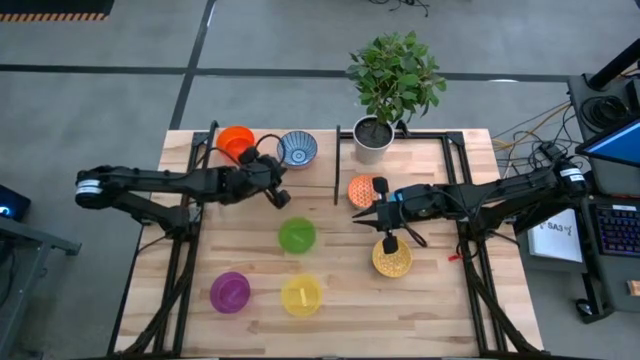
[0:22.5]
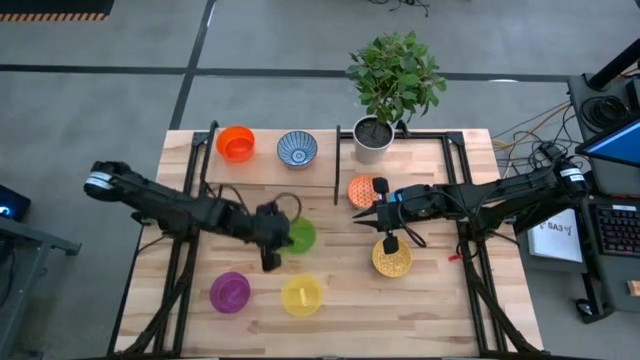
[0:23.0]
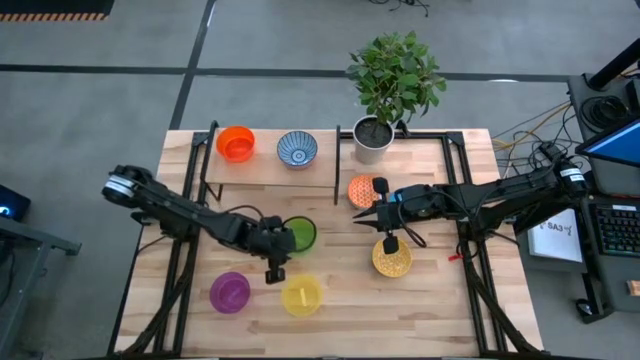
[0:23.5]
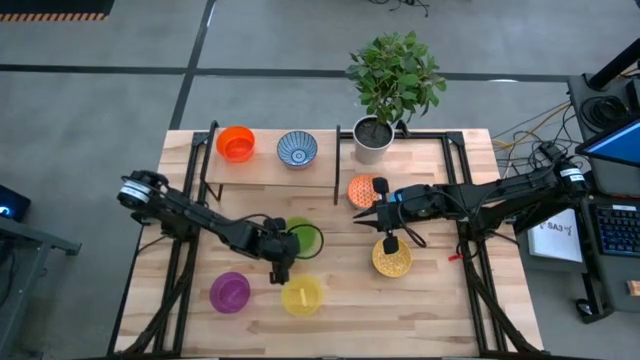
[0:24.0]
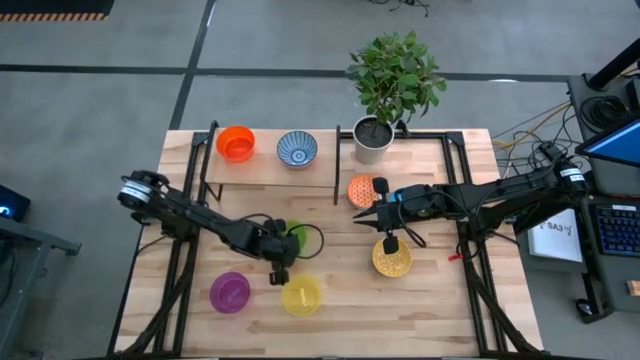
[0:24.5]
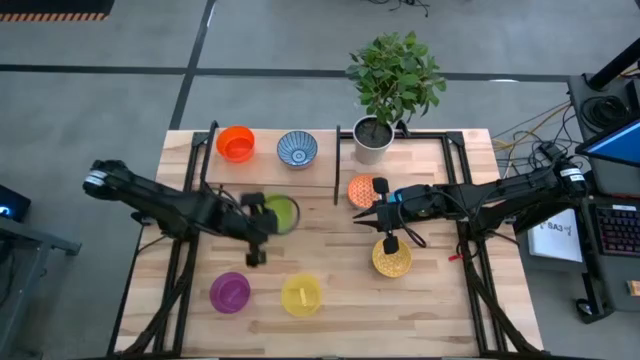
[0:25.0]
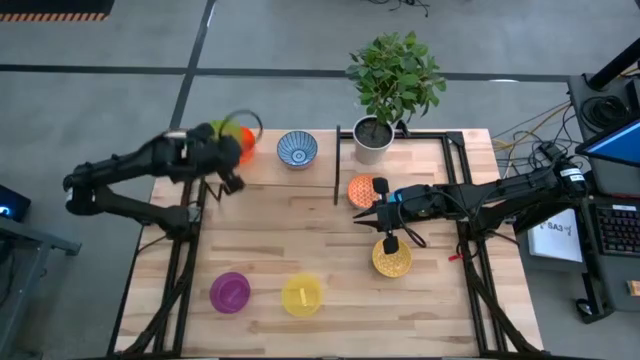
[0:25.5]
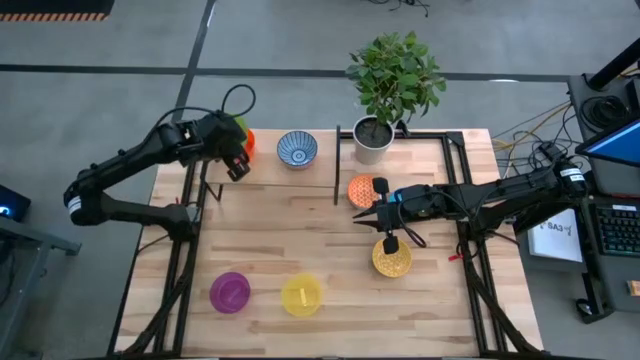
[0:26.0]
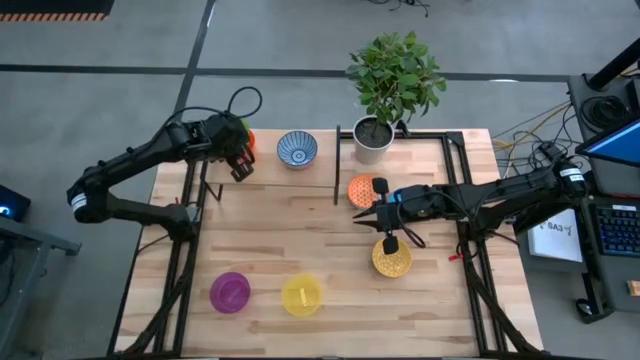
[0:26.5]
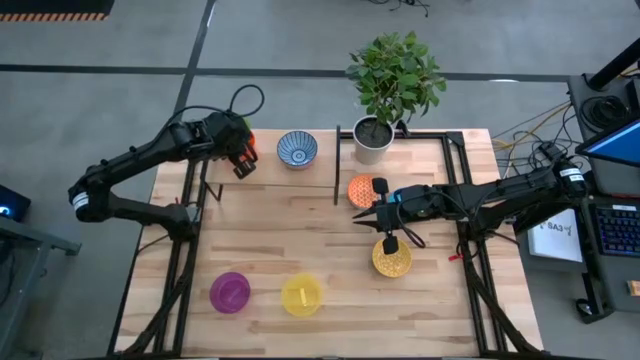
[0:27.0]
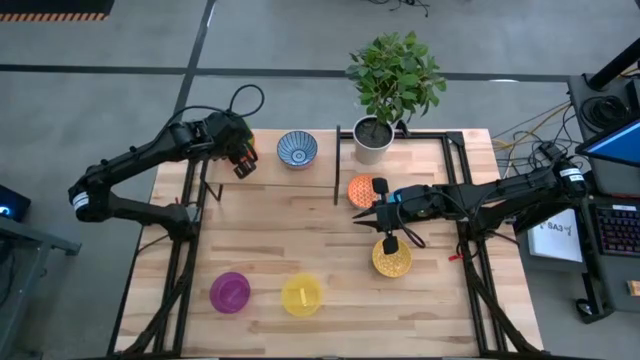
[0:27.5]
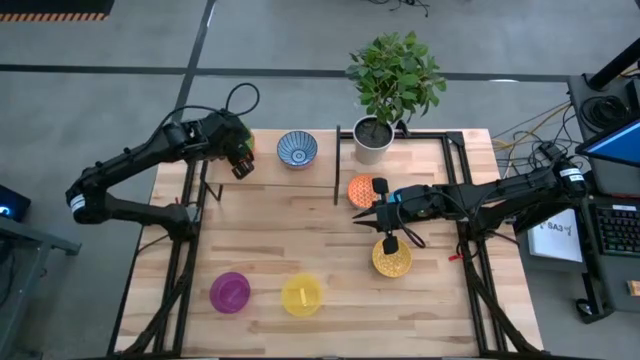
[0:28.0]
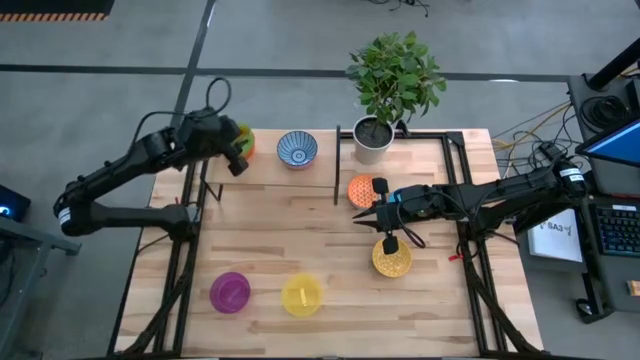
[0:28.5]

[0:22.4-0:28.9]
Task: Place and stack bowls onto a shelf
Stack the green bowl on the orange bowl on the shelf

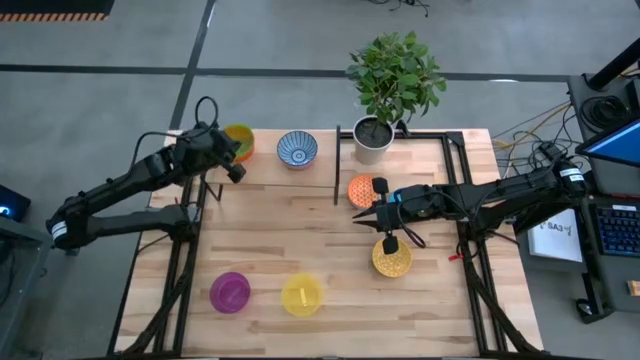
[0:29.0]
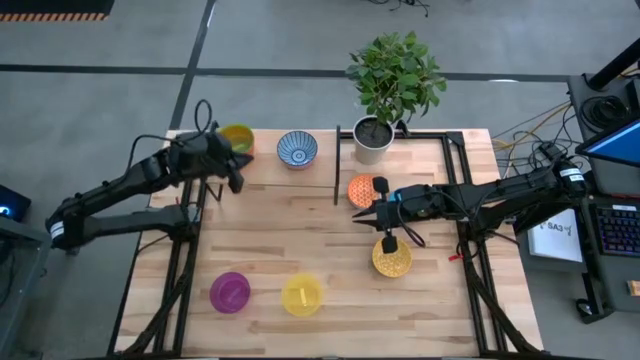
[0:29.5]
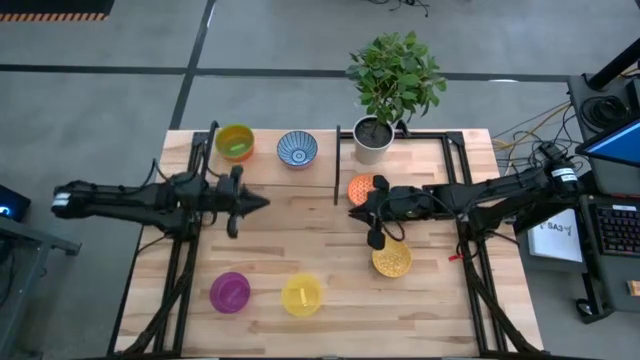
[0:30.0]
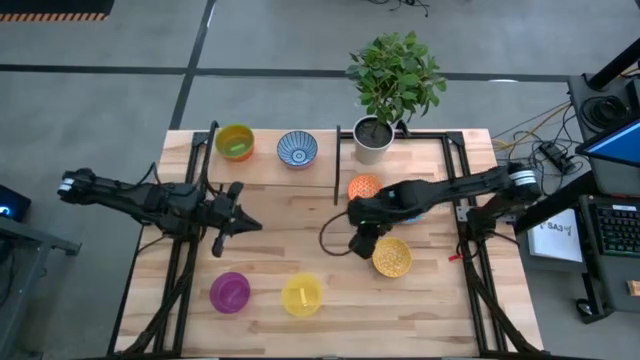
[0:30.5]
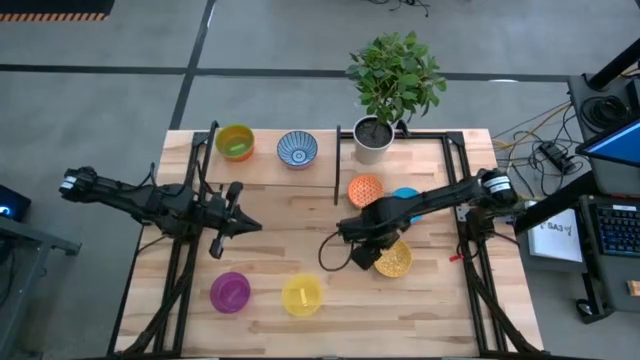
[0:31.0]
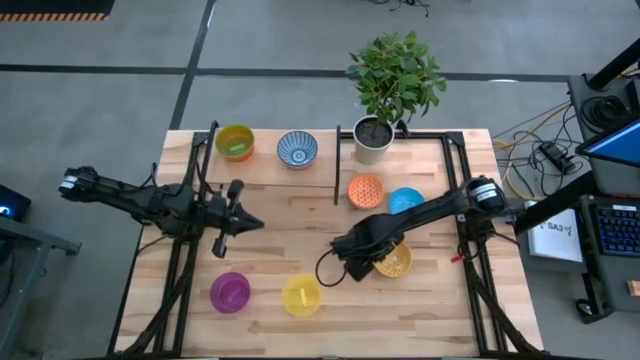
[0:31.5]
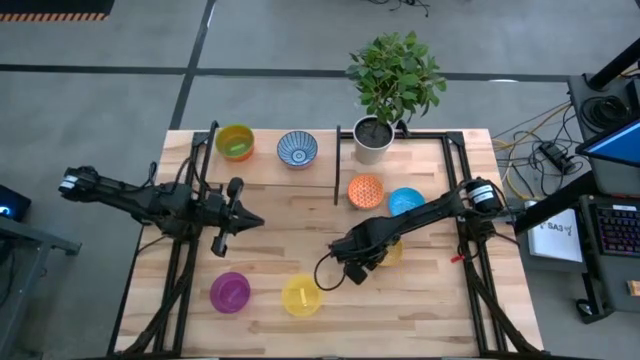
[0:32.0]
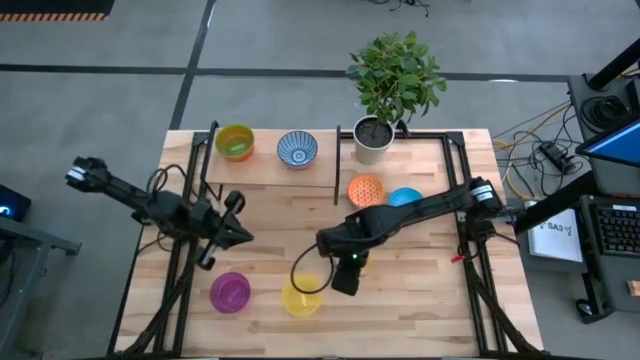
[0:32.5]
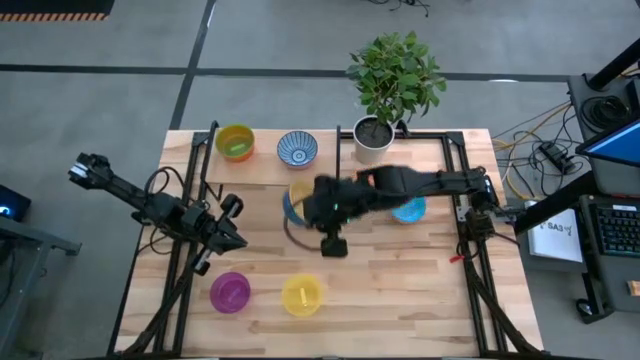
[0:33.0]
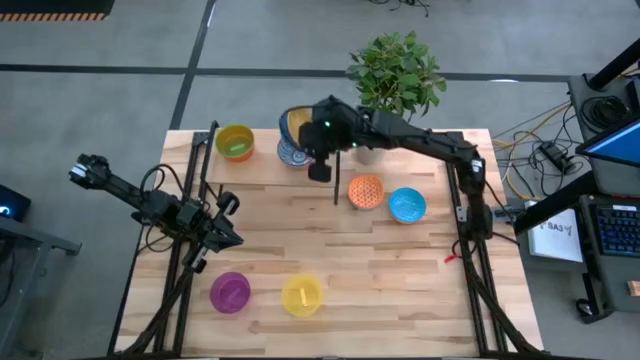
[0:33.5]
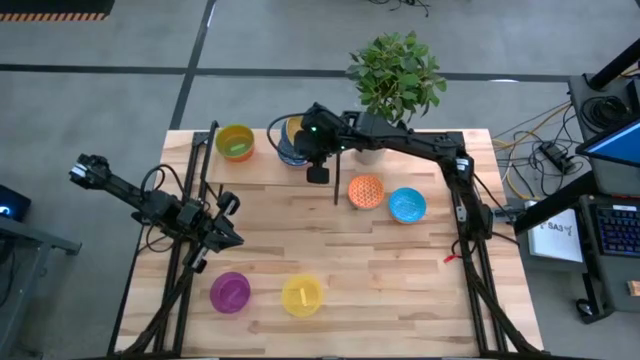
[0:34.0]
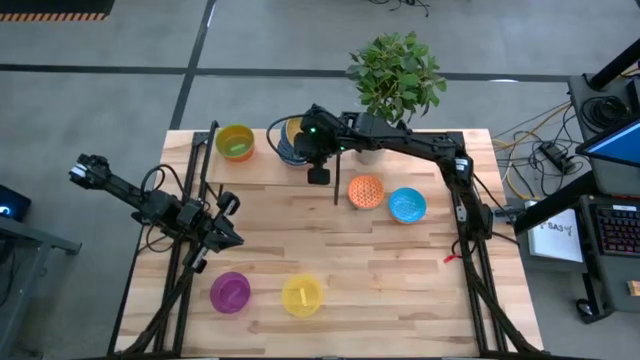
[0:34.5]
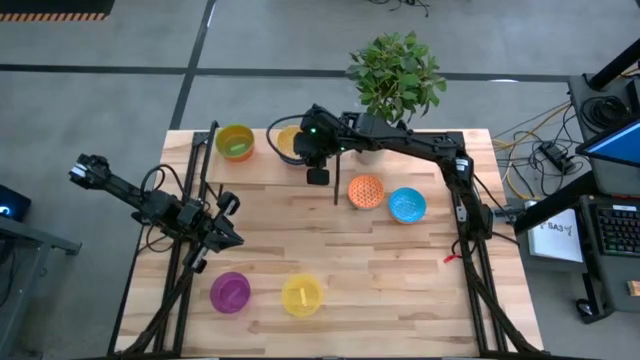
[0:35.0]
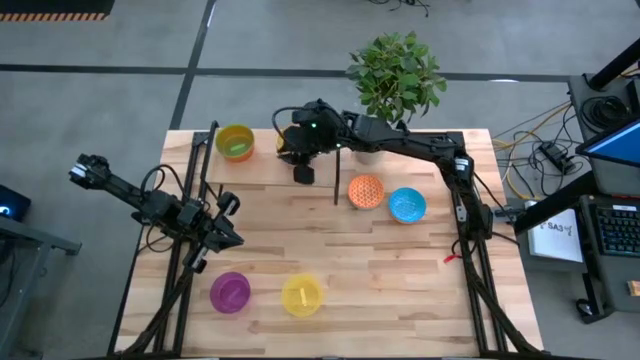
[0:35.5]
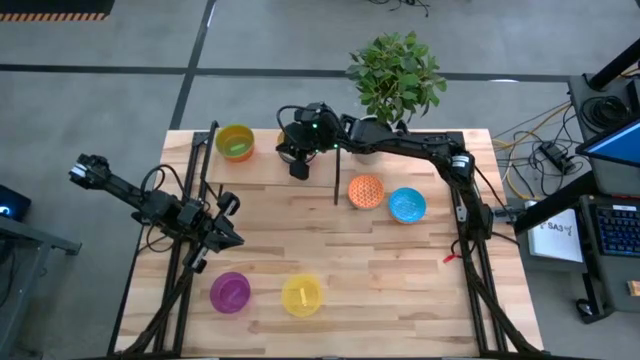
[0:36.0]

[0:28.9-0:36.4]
Stack the yellow bowl on the red bowl on the shelf

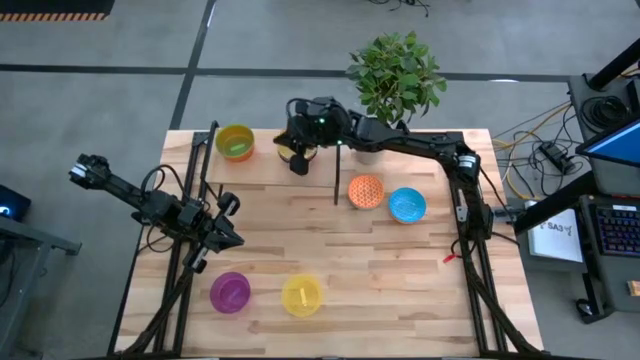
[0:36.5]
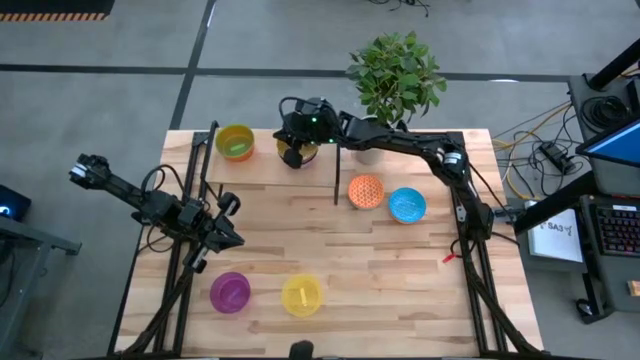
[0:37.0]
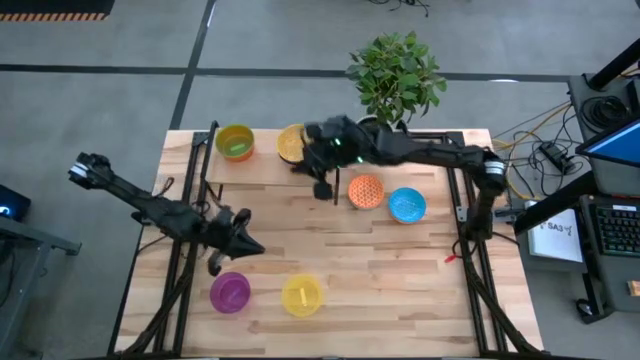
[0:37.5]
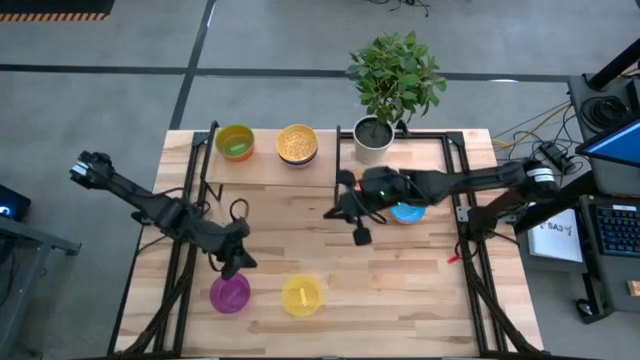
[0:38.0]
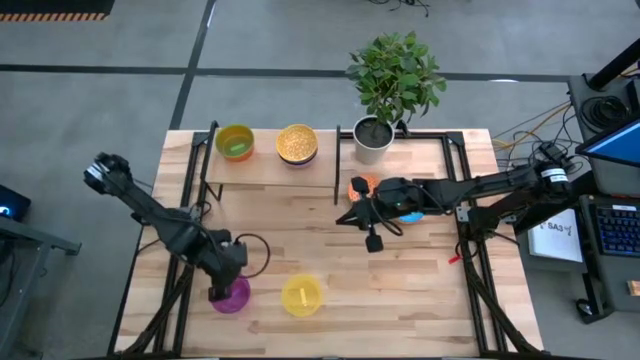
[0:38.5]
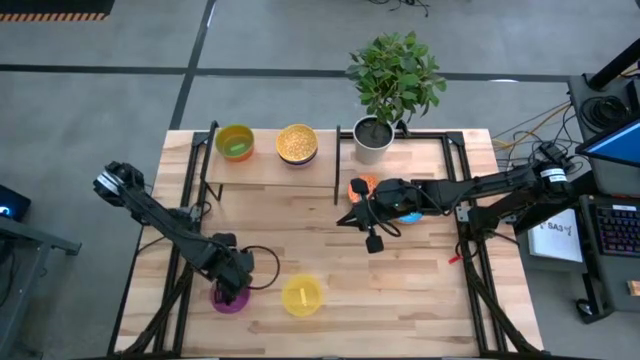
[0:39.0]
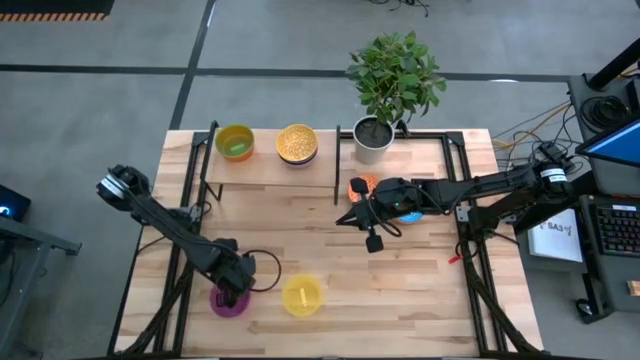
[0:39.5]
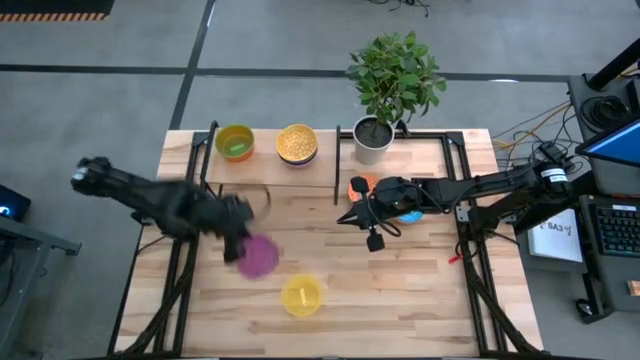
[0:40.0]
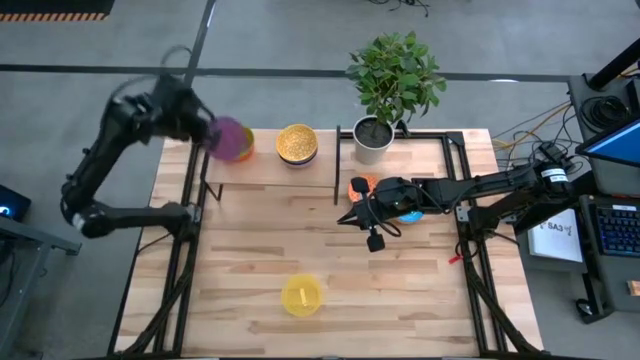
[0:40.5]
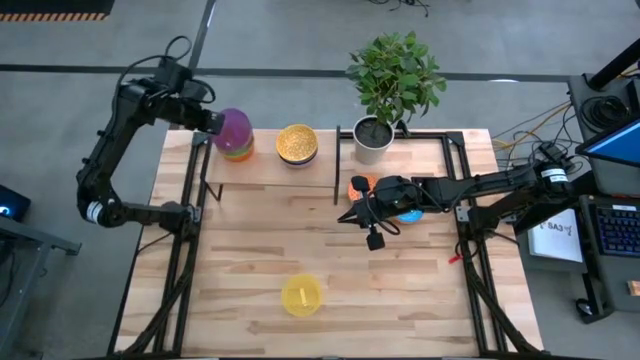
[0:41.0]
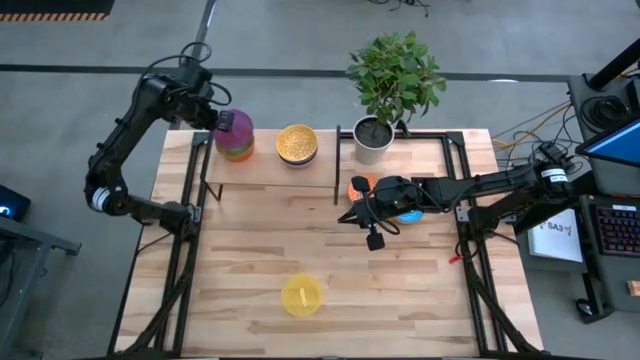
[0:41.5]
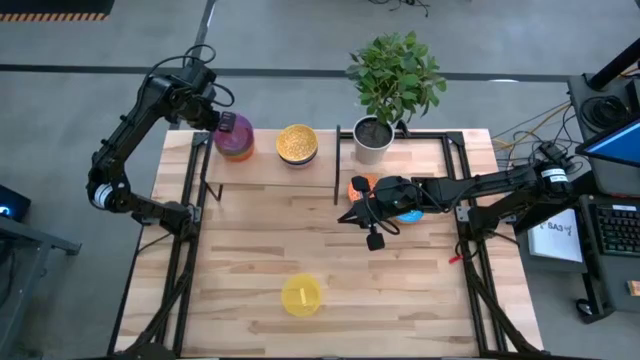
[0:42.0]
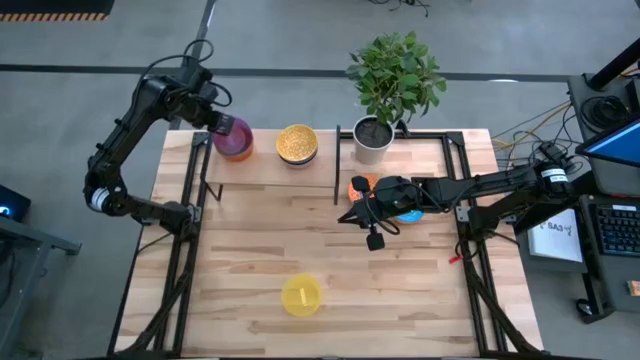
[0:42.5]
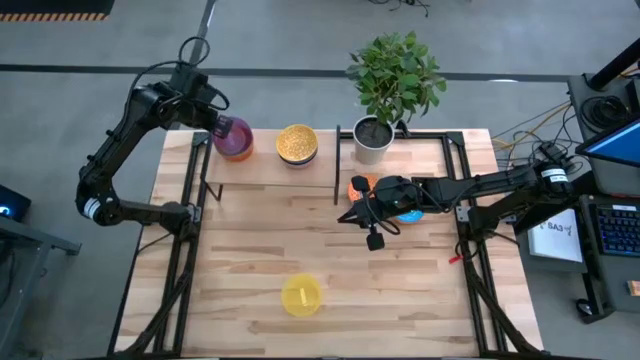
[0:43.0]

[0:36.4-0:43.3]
Stack the purple bowl on the green bowl on the shelf
